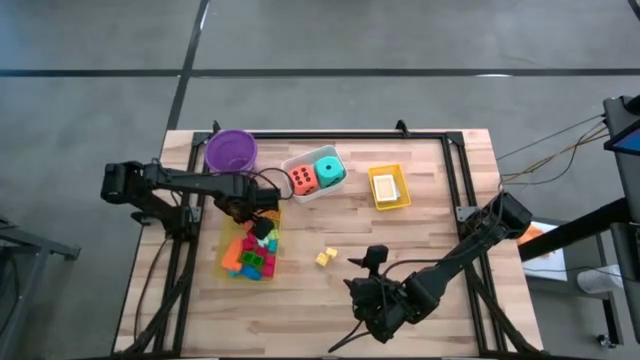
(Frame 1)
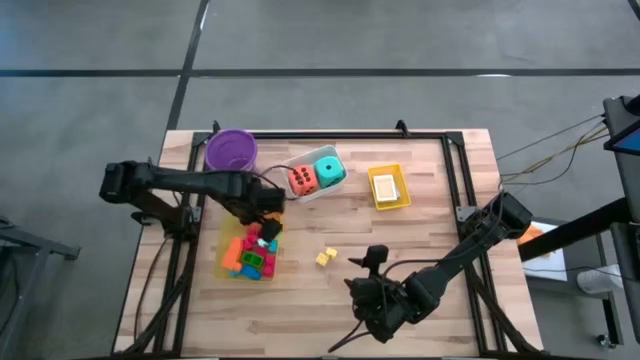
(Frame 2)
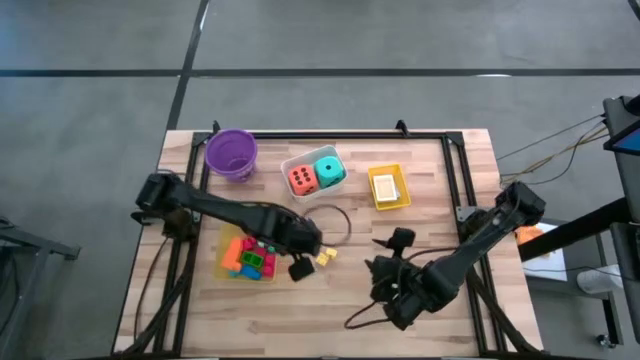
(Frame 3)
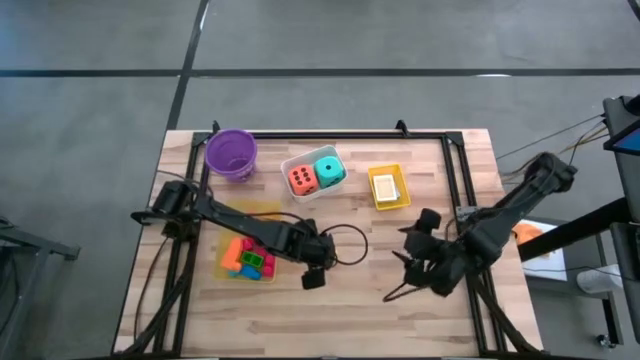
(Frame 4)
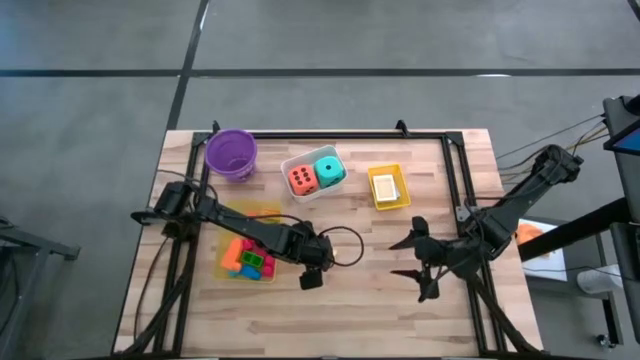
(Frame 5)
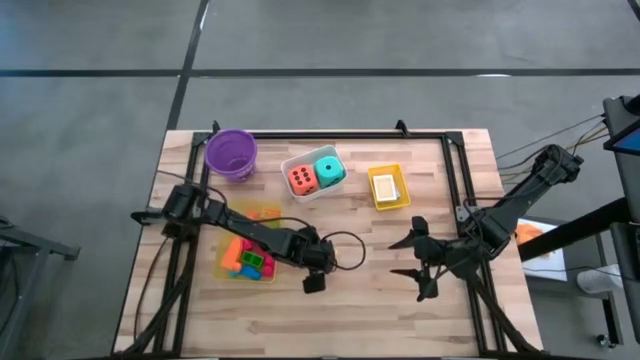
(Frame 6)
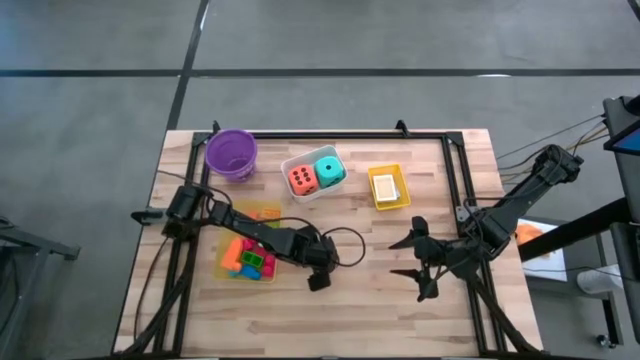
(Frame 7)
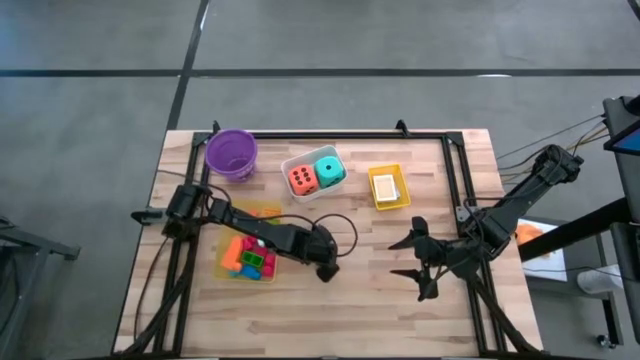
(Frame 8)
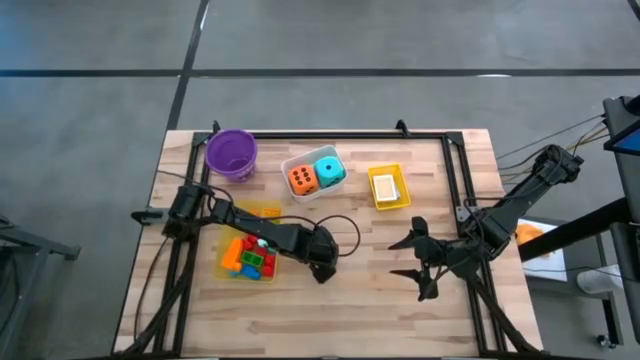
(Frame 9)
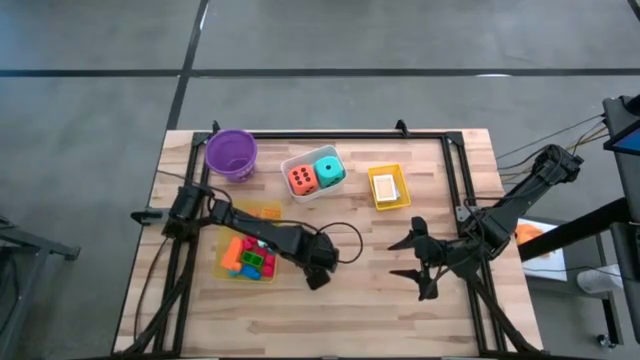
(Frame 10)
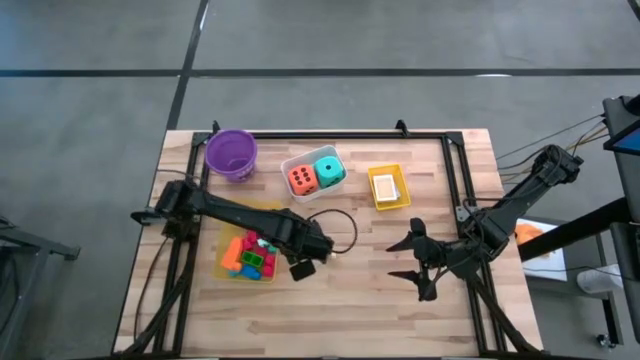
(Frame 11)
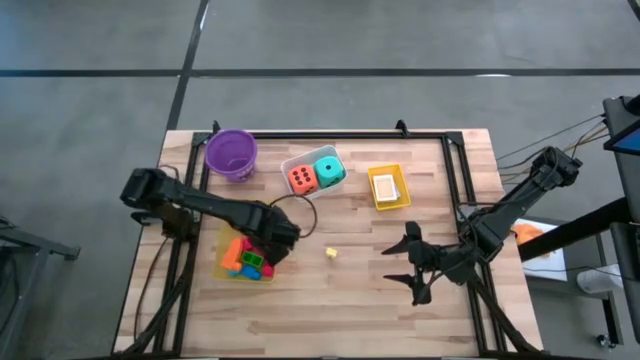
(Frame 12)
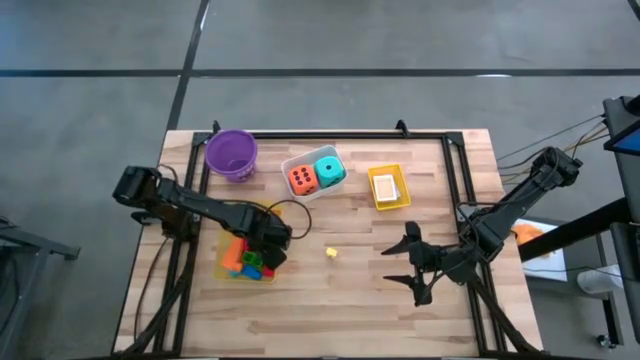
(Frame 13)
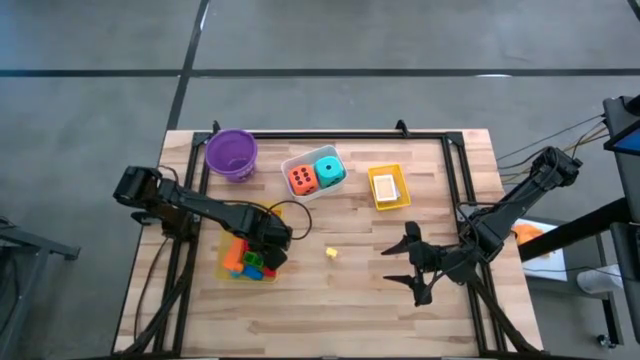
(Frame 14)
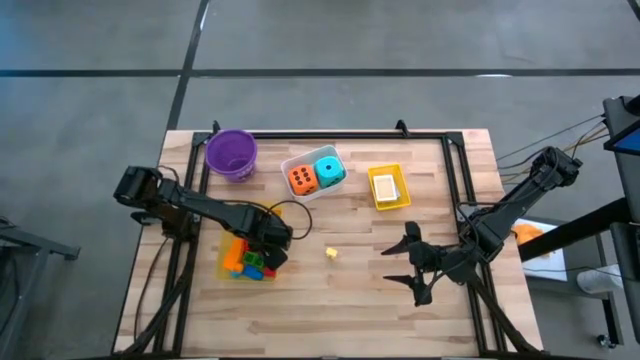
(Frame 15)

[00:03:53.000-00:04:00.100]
Task: Pick & Place Toys
Put the light yellow game piece into the light yellow bin

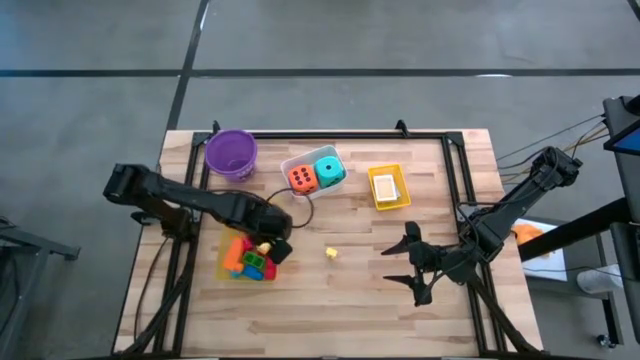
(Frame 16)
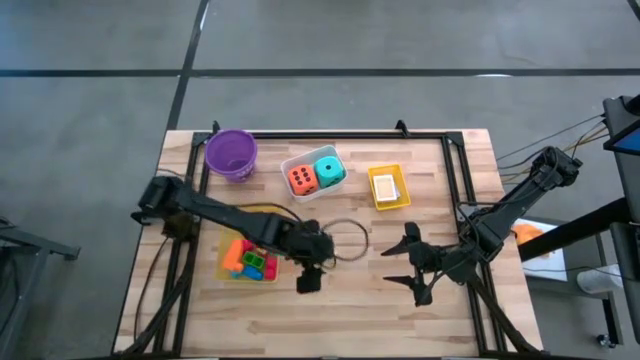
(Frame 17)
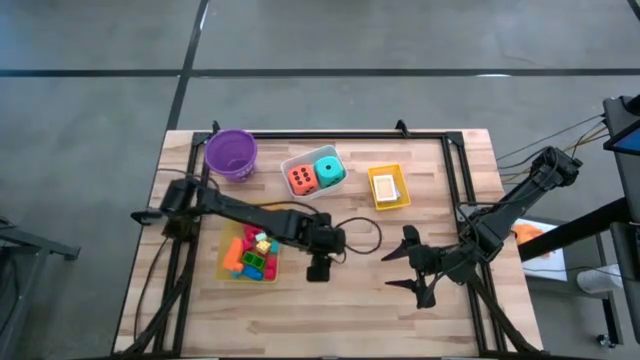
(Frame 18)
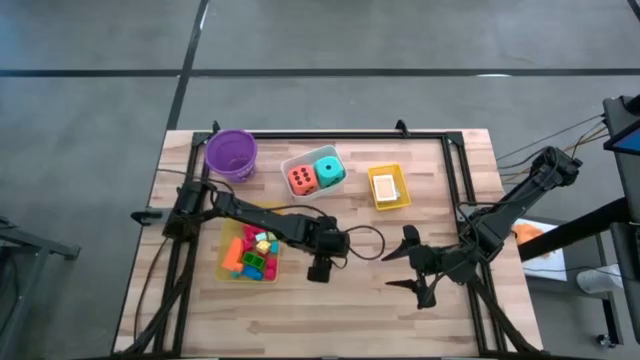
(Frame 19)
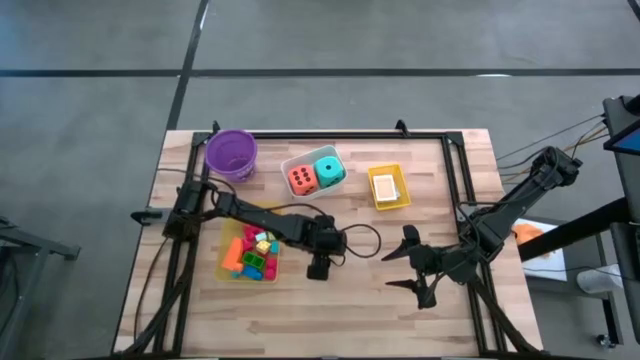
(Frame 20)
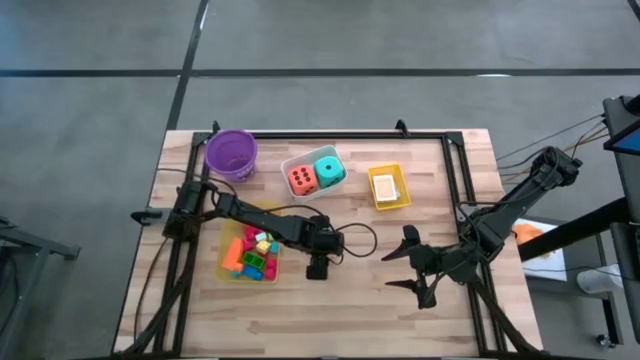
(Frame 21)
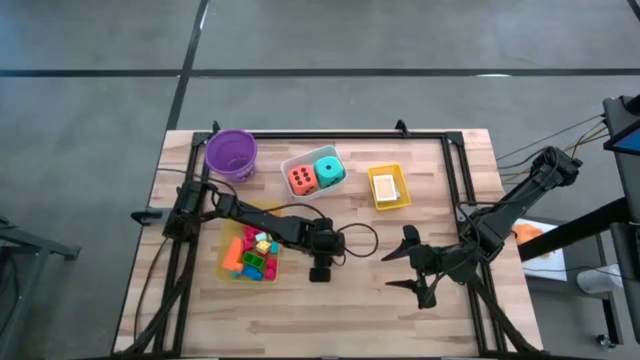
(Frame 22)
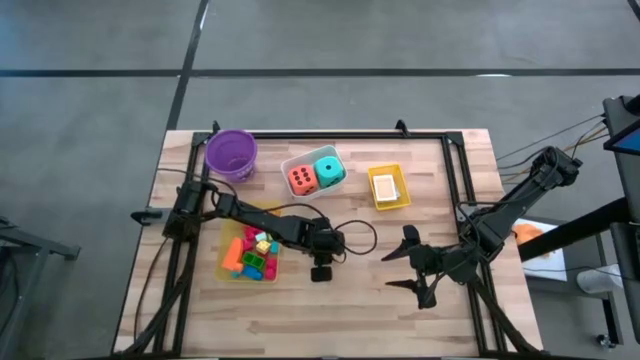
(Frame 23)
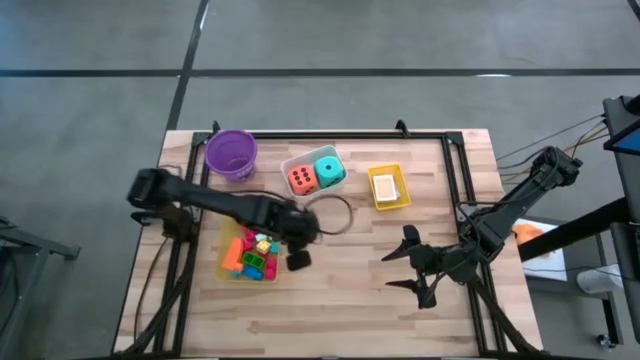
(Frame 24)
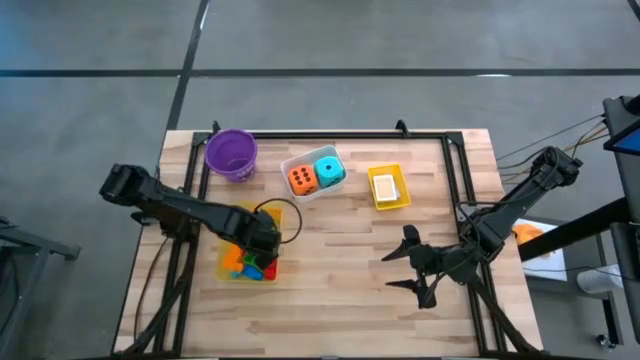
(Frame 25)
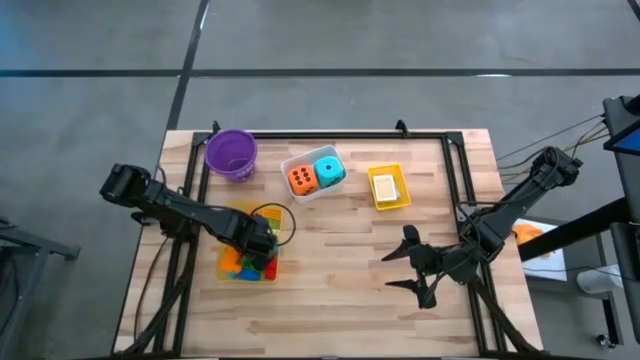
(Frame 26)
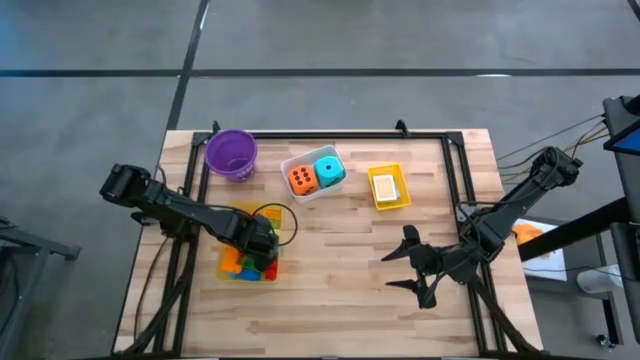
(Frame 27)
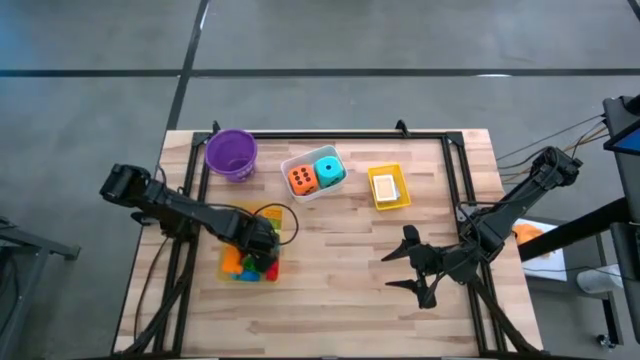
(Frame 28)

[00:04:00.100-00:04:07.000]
Put the light yellow game piece into the light yellow bin

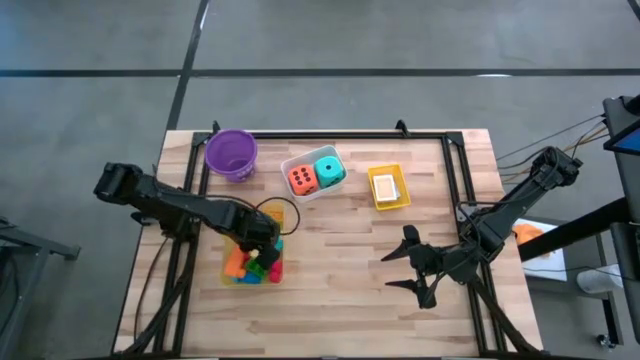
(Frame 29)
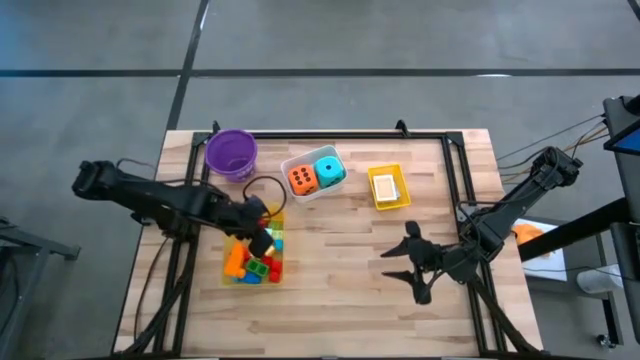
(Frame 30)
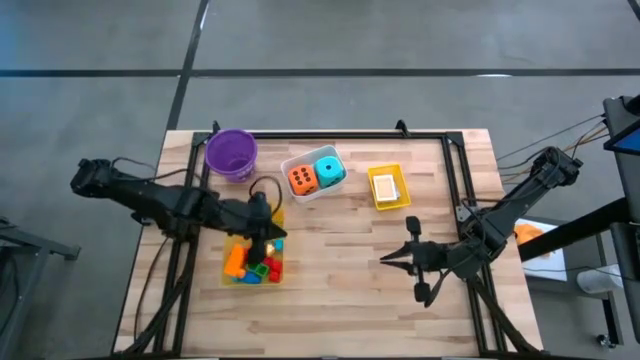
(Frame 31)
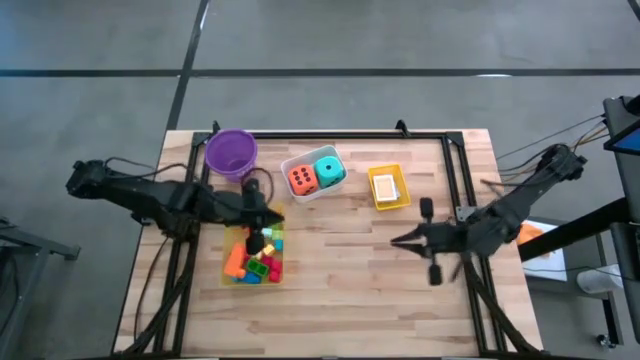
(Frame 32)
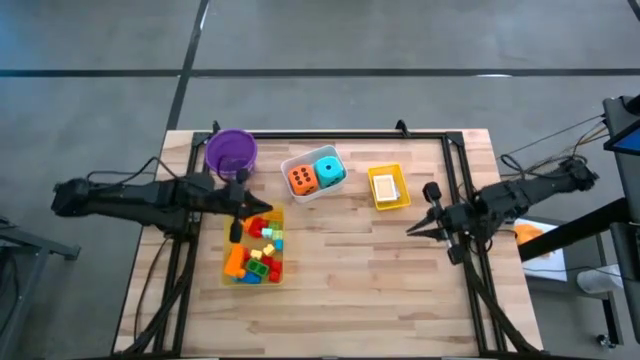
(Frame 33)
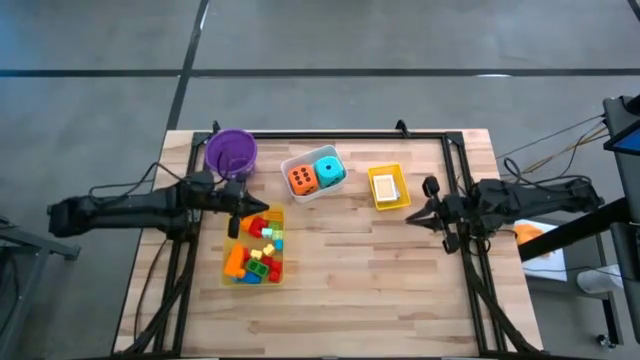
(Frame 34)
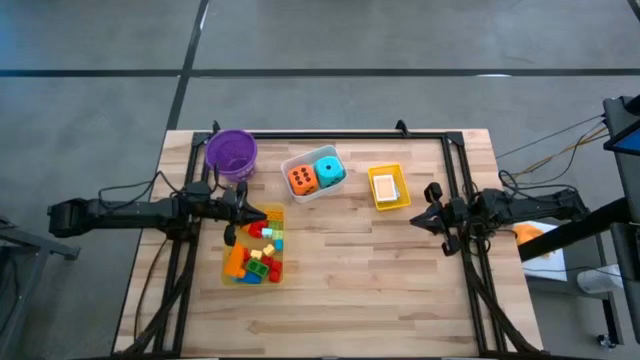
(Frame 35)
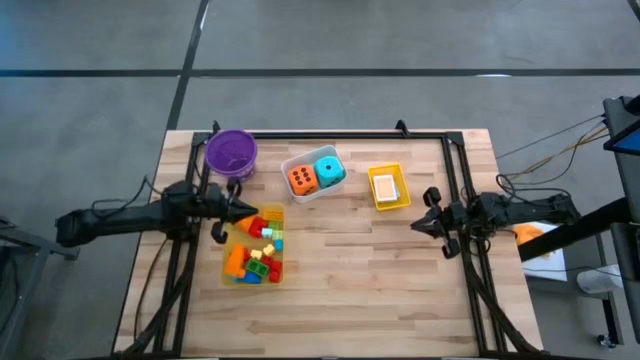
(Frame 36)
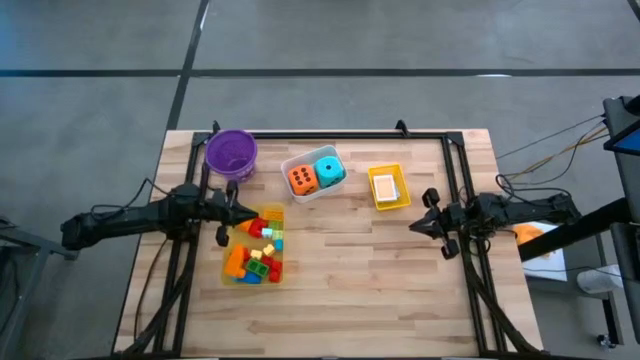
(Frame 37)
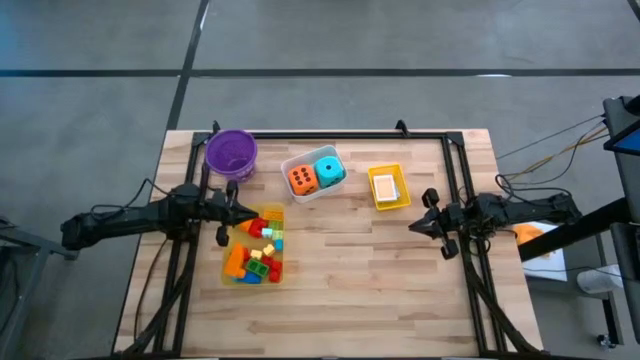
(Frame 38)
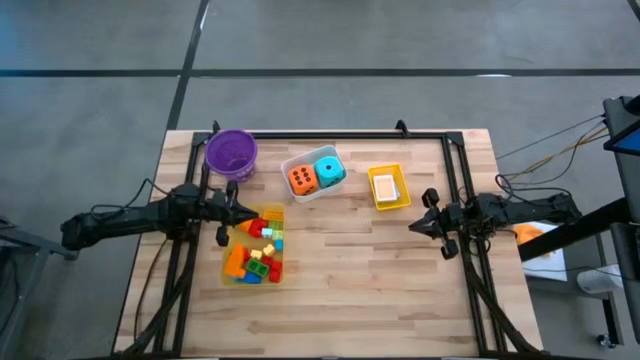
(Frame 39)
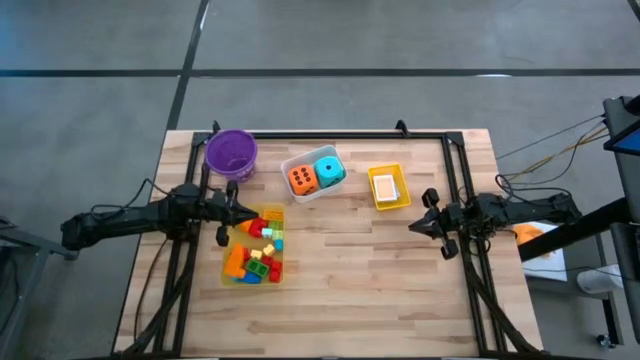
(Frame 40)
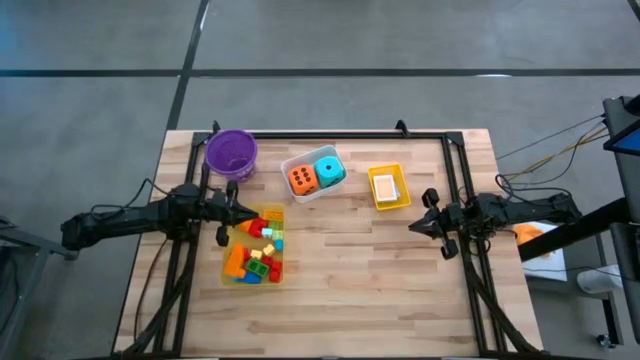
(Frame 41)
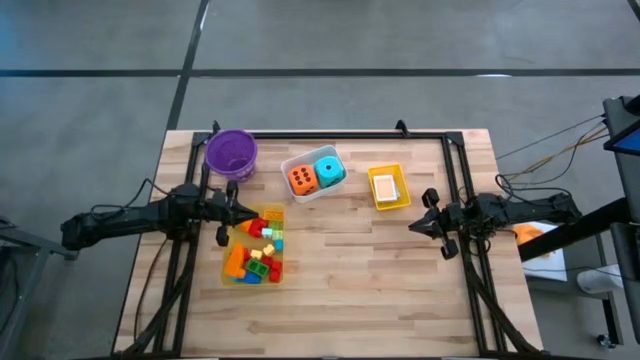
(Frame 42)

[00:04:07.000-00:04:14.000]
Return to Home Position
